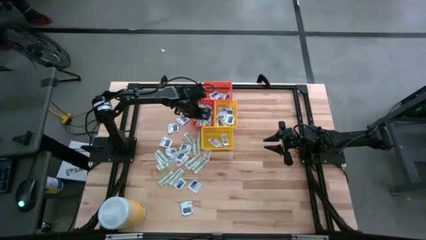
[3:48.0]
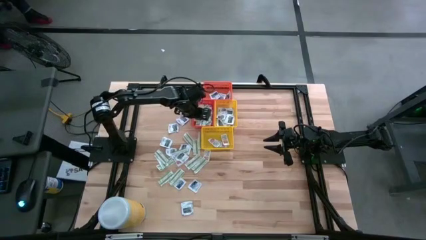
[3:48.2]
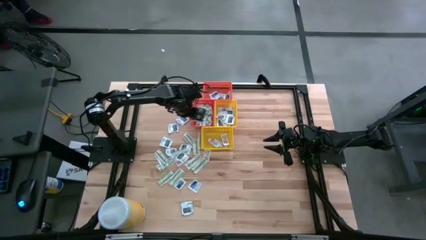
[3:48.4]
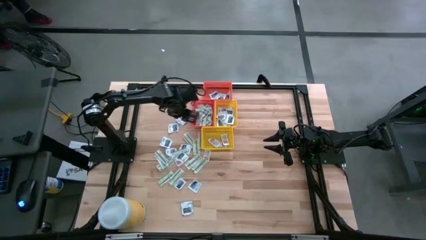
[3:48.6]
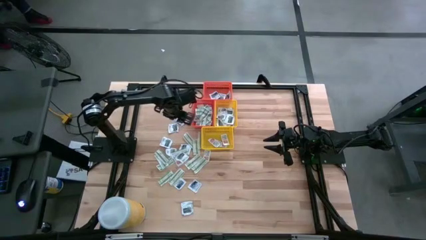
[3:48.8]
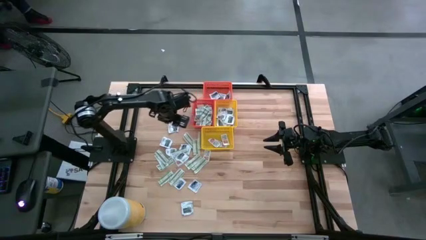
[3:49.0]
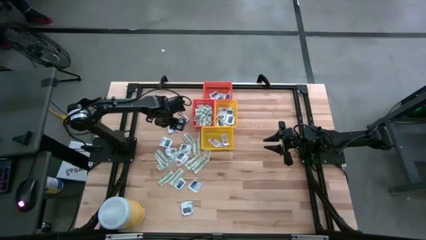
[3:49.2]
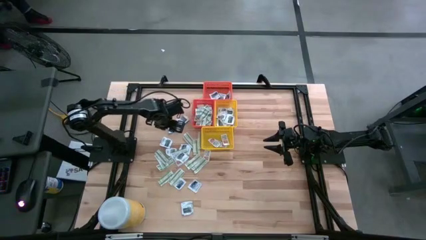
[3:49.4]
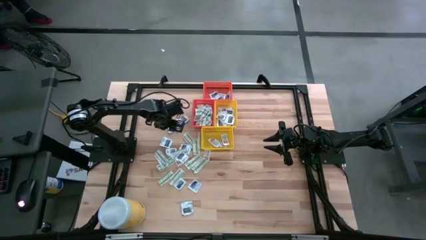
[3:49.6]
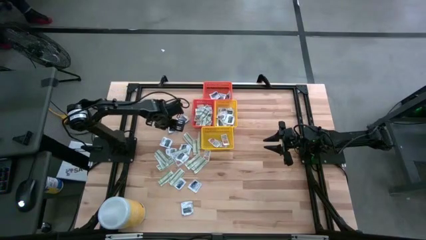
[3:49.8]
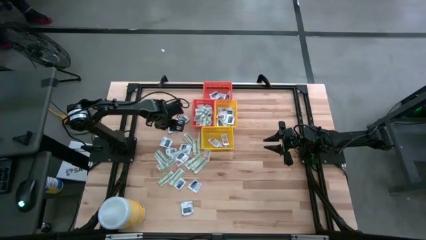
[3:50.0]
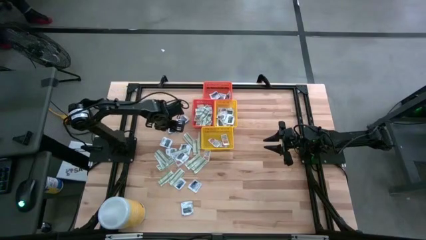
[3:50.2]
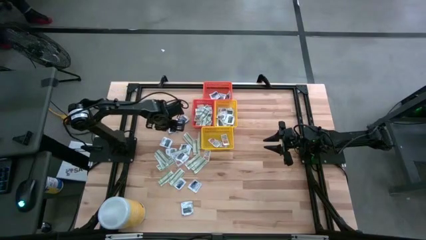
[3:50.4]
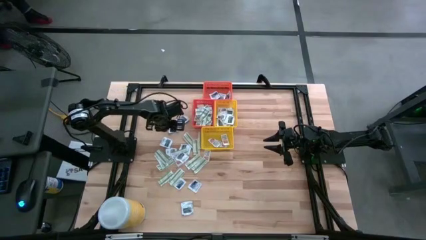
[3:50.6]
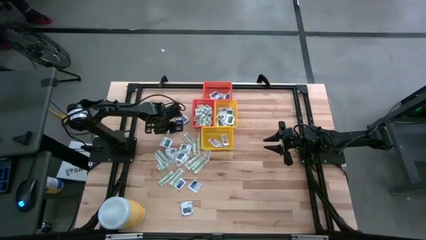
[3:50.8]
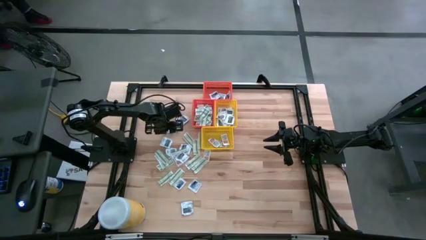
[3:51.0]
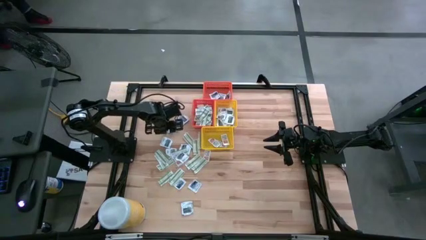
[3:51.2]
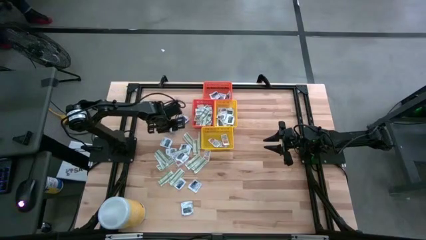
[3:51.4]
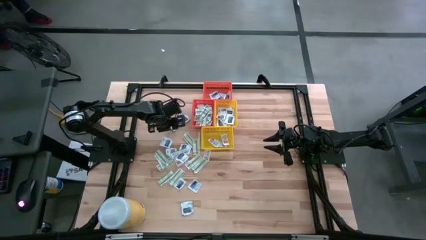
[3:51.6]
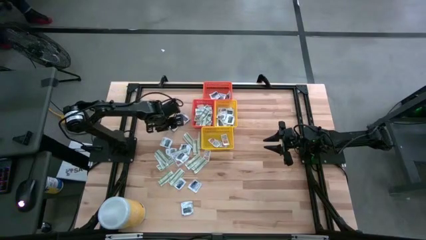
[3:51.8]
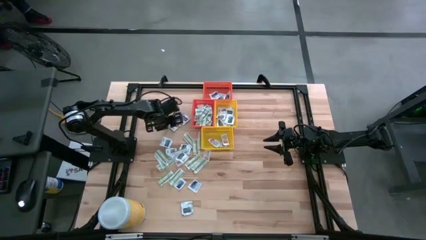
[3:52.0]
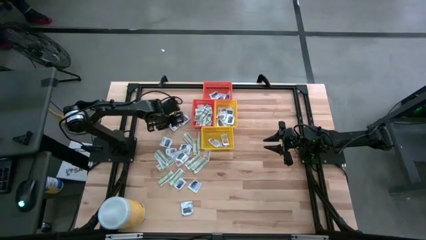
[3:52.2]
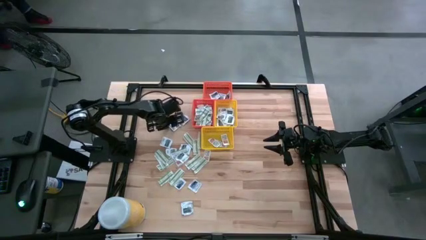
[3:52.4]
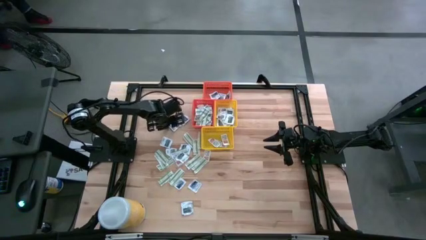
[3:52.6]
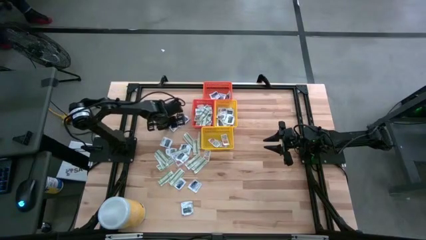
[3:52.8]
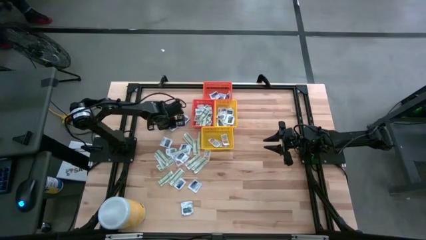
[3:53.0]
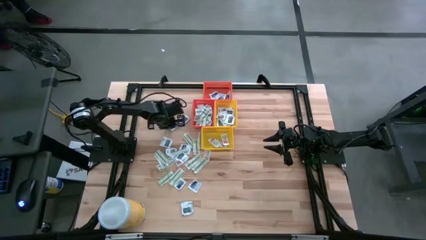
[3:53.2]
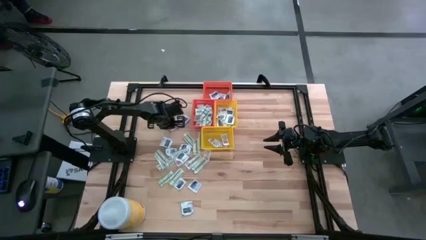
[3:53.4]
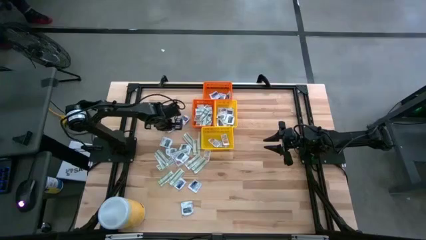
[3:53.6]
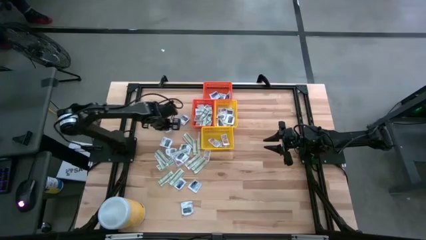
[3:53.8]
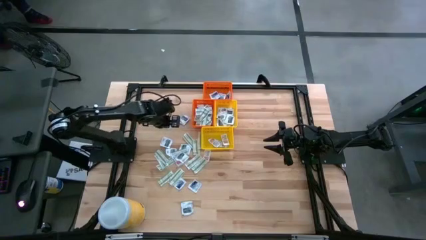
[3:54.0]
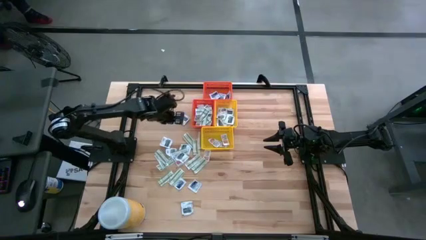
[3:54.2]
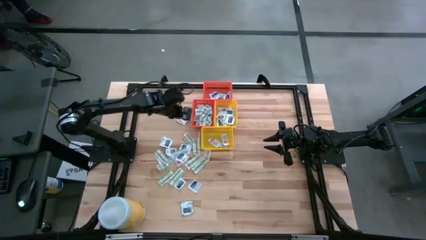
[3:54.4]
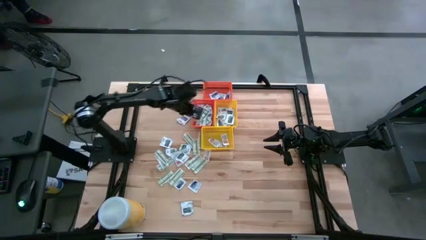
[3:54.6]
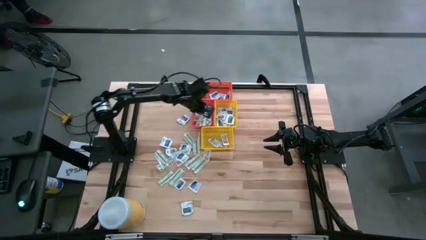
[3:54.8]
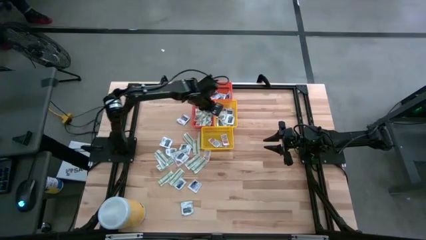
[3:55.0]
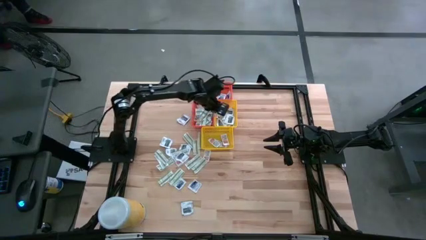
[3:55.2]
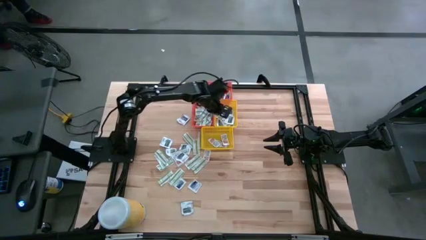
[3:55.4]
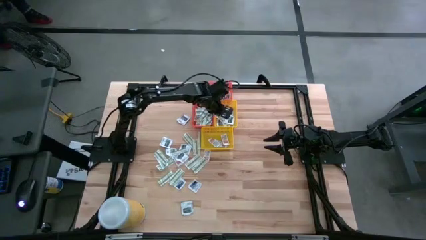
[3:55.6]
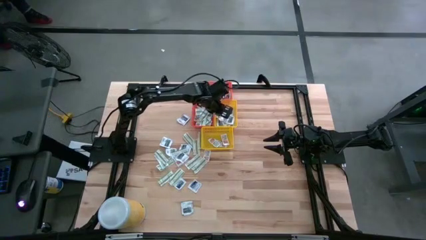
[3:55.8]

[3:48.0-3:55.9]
Task: Pick & Place First Aid Supplies
Put the towelette pack into the top yellow bin

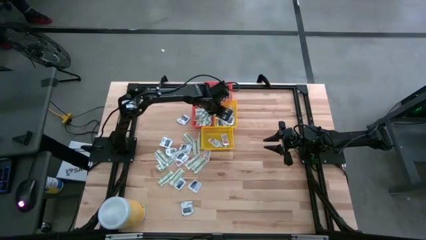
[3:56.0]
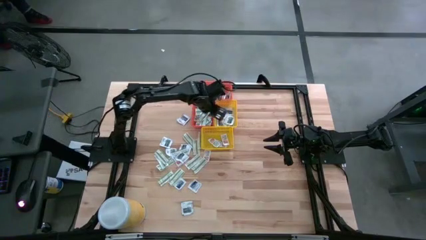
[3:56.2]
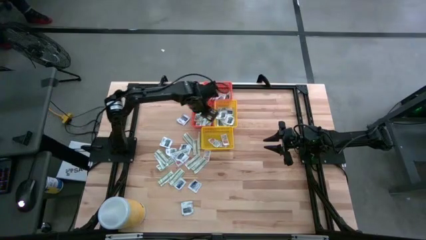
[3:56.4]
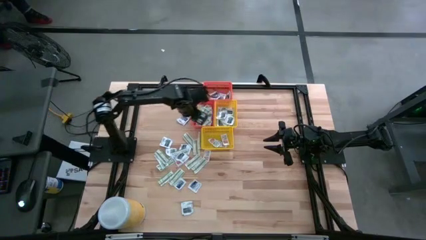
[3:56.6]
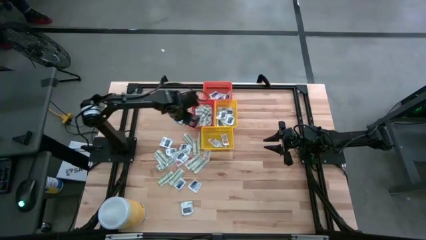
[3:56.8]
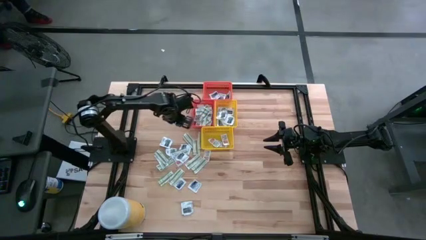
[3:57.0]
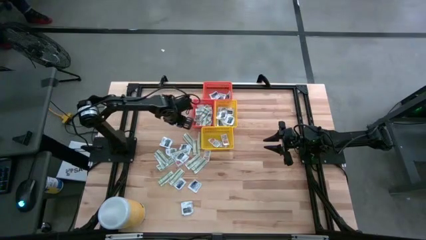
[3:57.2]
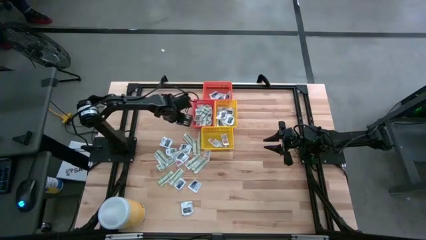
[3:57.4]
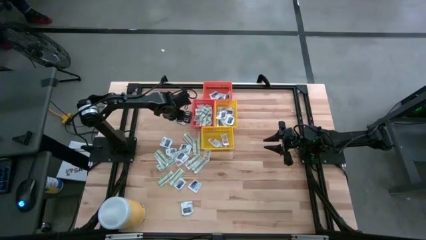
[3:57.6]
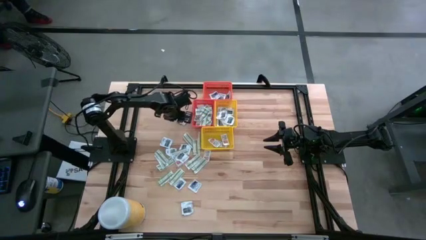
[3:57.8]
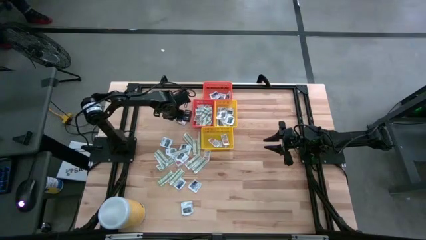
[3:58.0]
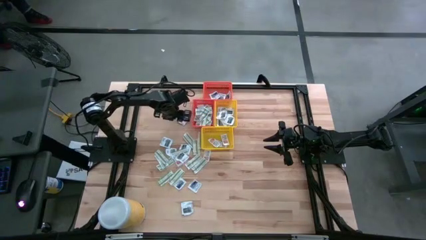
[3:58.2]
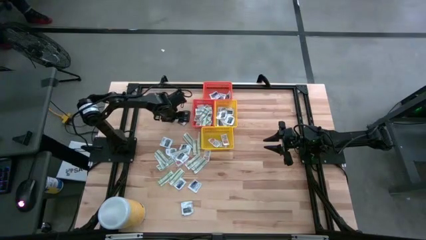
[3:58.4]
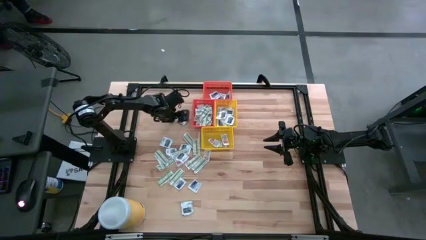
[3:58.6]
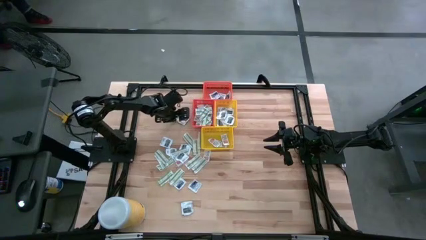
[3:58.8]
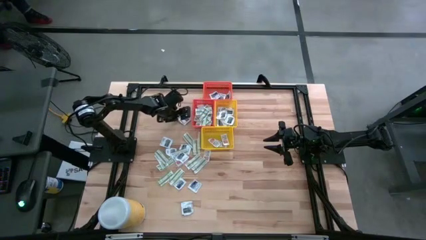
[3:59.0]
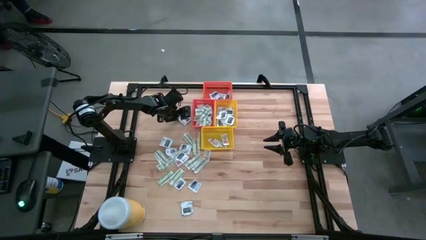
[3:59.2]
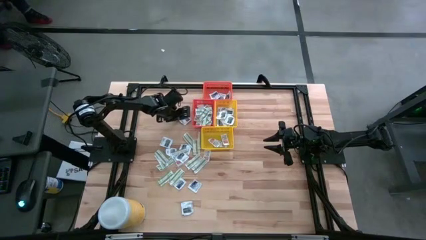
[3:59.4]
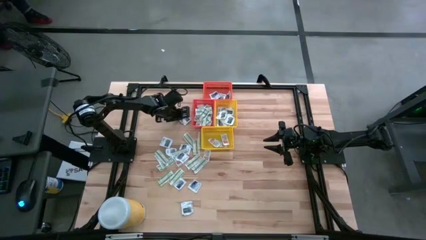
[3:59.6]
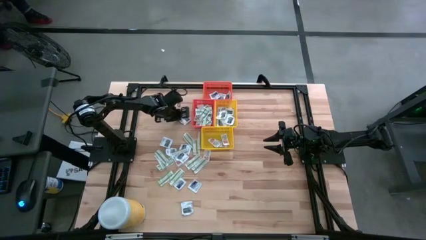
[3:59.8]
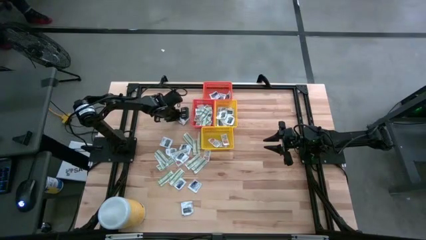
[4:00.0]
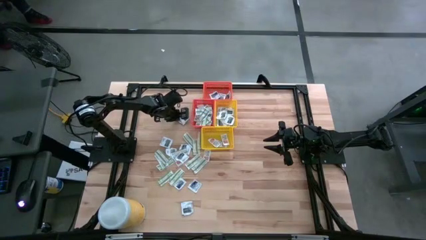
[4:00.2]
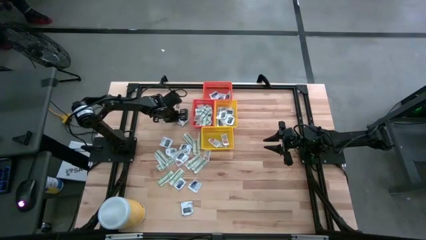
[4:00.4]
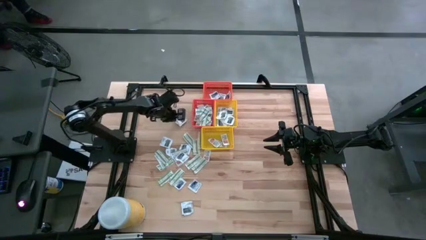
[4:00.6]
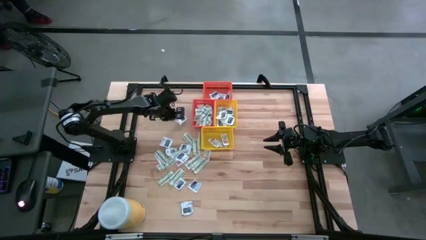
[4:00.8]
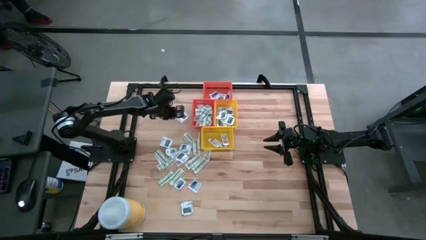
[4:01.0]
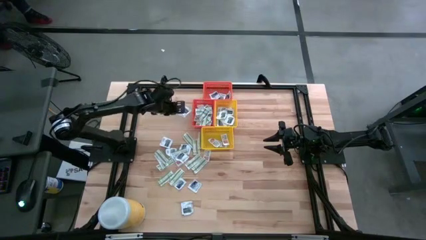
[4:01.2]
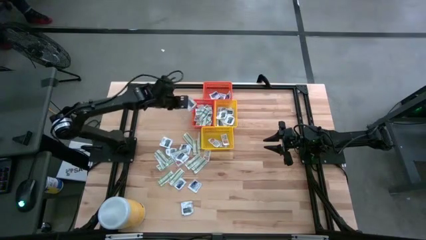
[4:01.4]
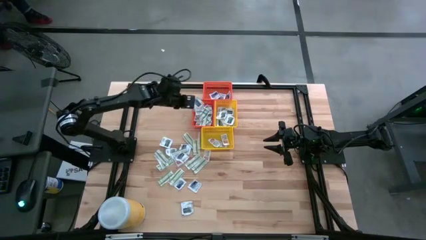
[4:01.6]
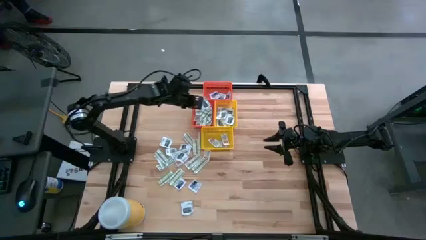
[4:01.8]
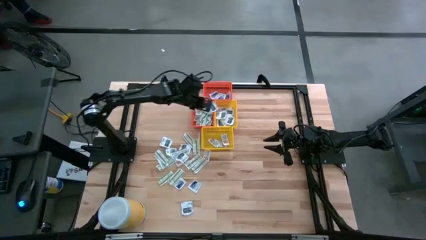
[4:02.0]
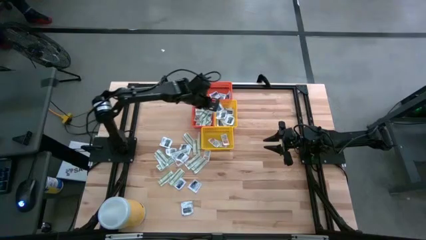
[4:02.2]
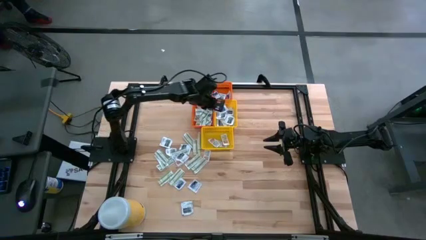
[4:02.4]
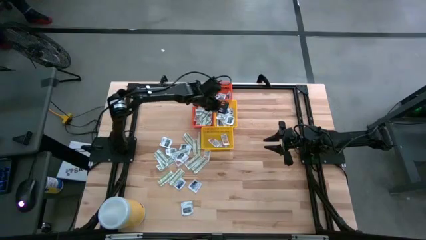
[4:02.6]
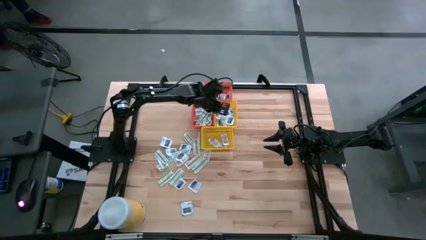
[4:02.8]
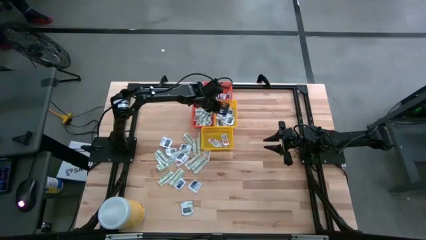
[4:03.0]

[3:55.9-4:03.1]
Put the towelette pack into the top yellow bin
